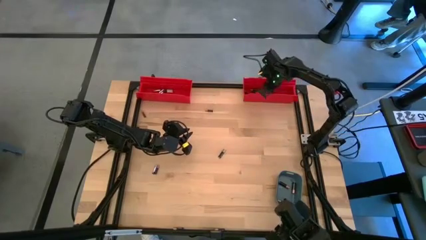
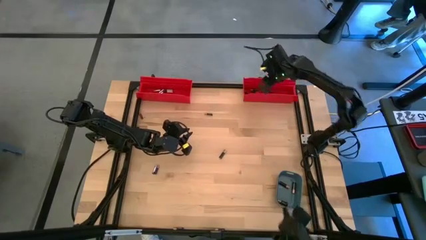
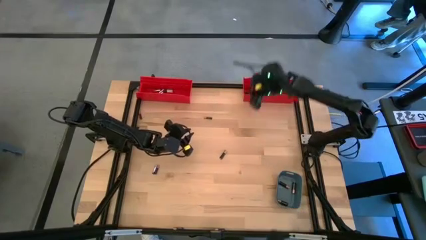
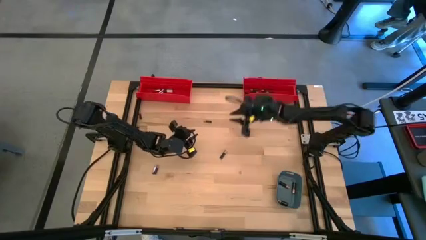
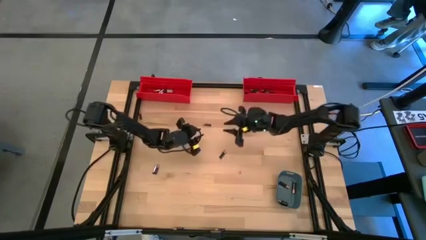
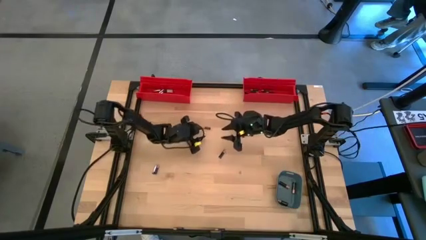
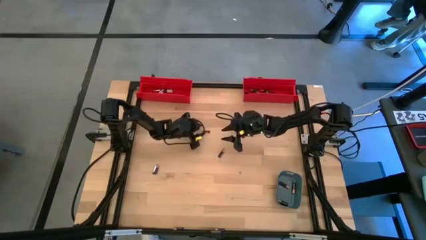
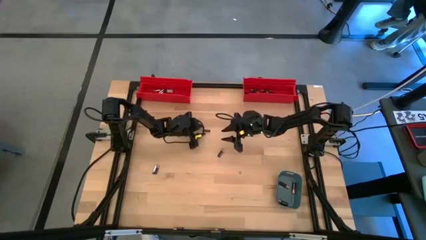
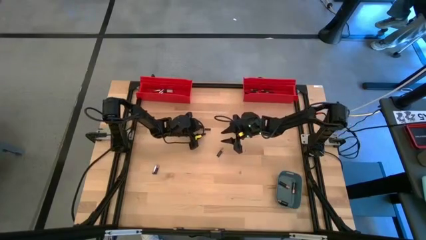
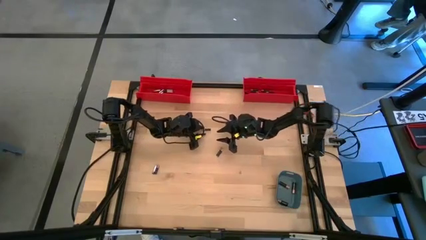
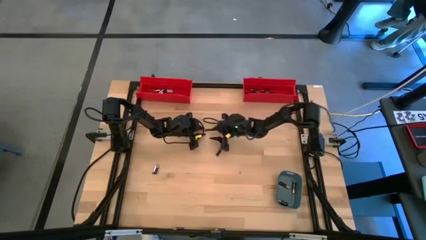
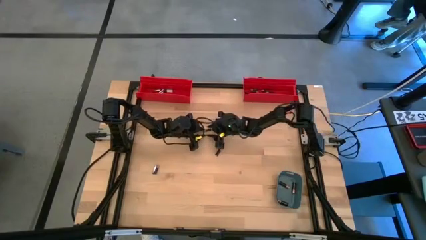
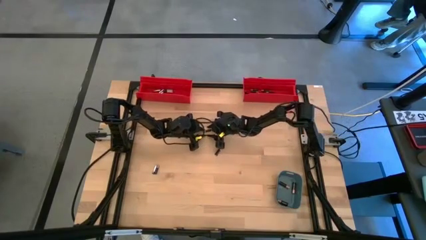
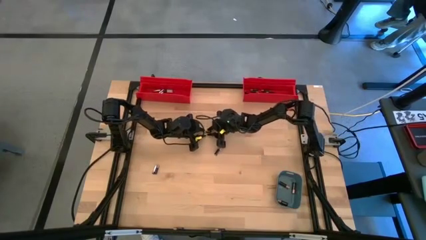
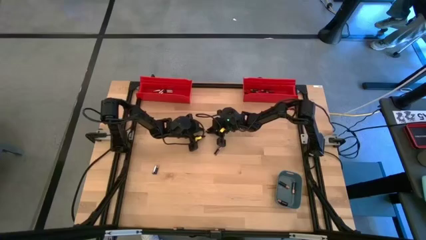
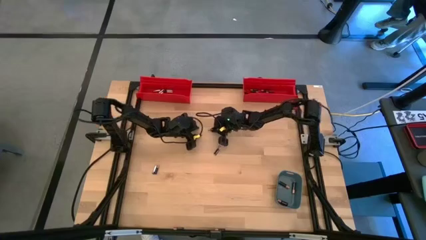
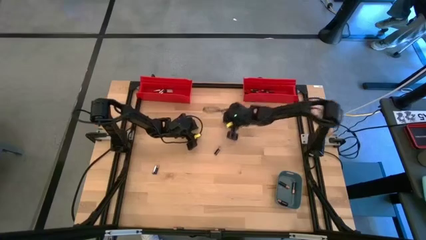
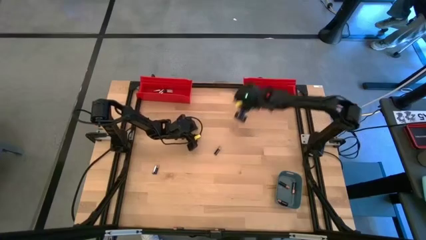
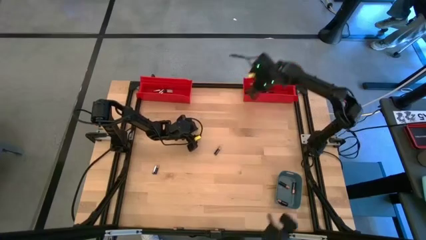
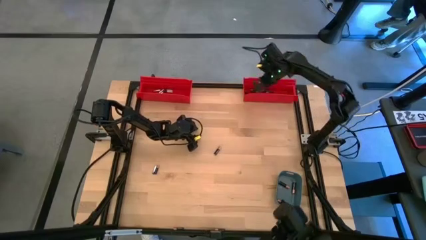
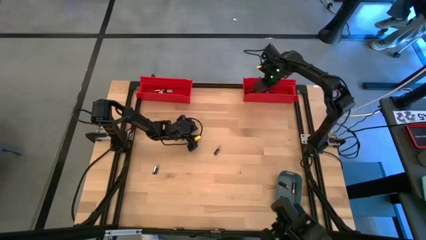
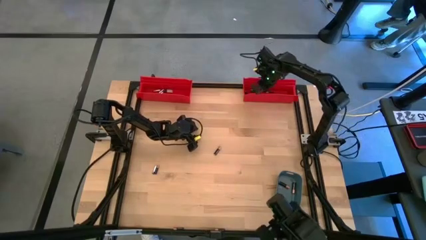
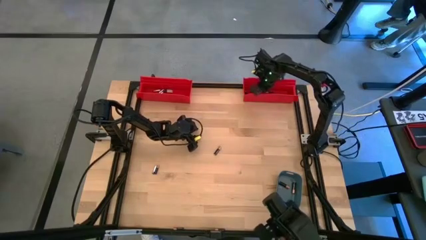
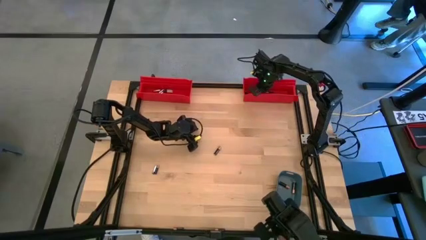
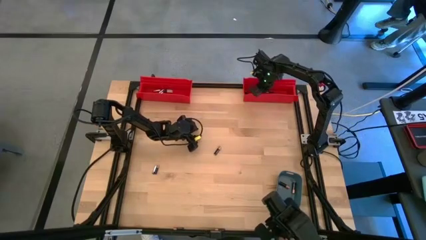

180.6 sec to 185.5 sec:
Task: Sort batteries
Put the small black battery into the right red bin

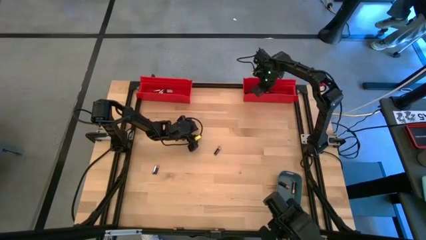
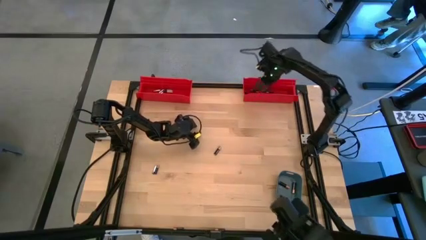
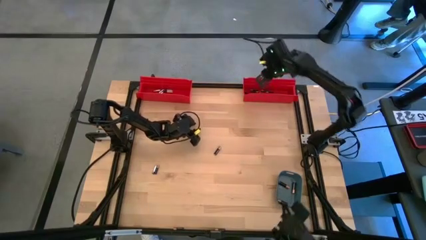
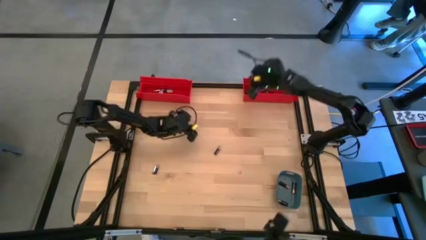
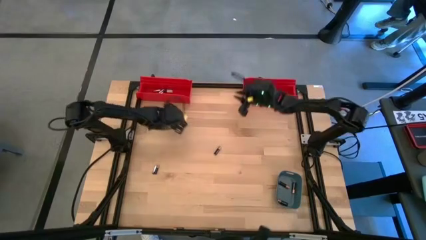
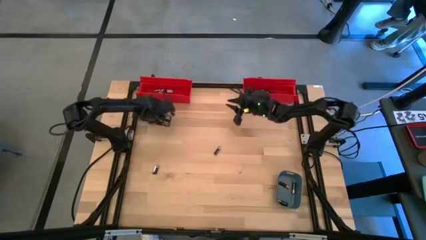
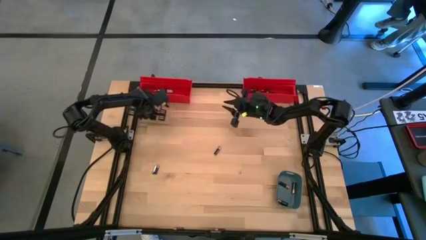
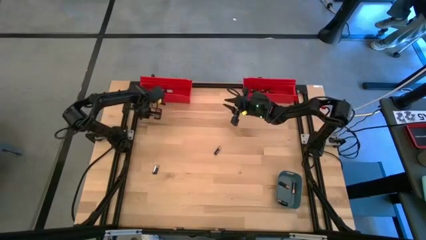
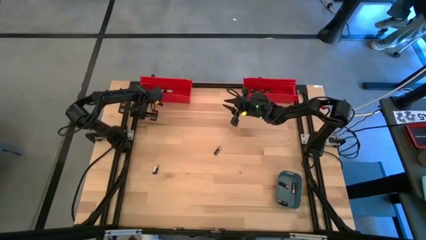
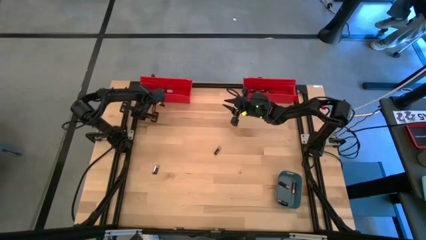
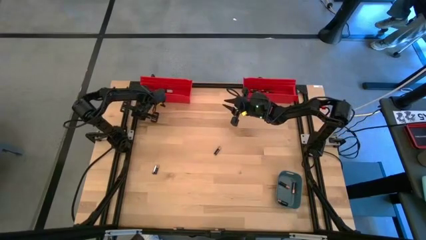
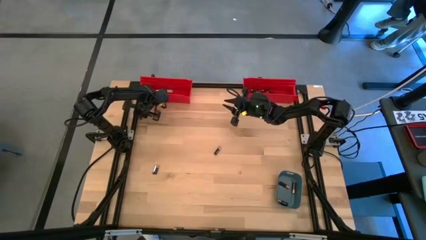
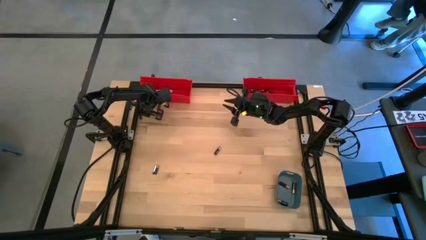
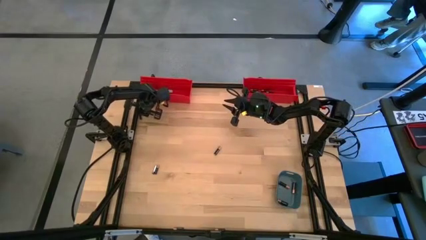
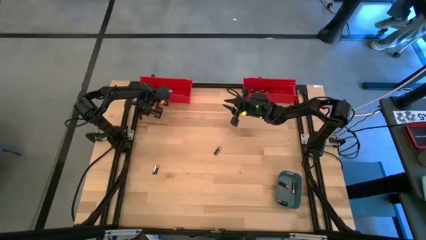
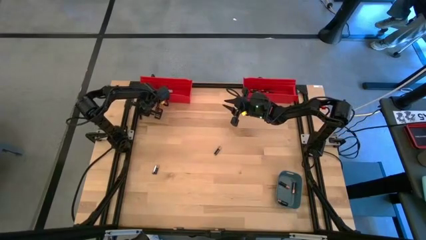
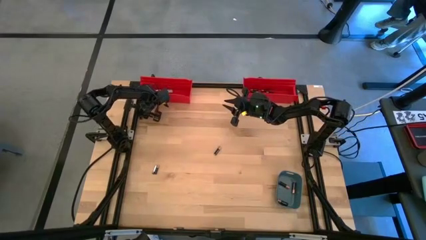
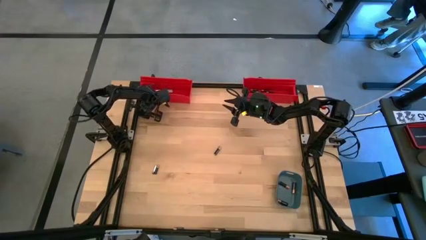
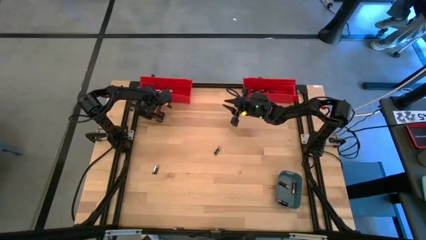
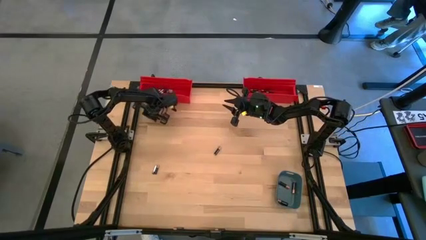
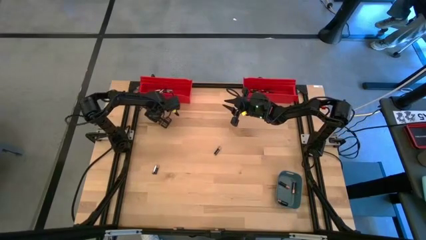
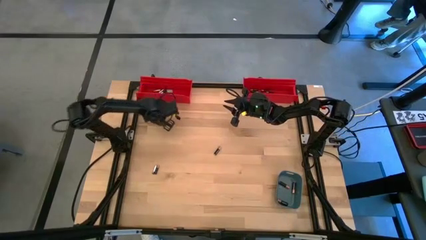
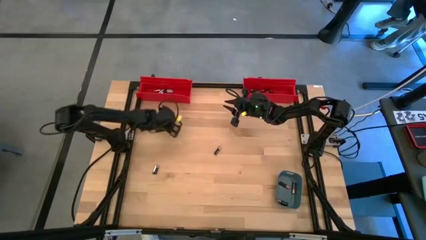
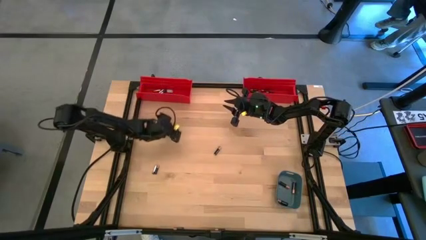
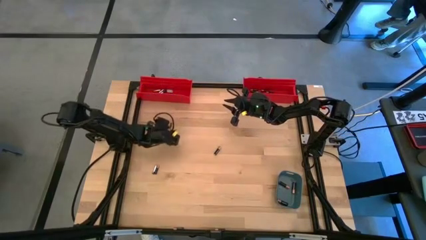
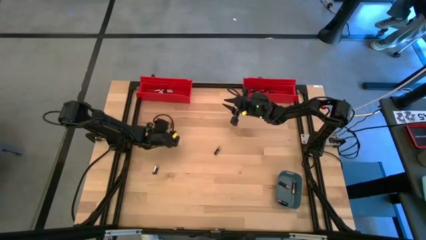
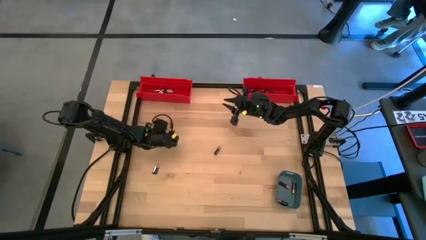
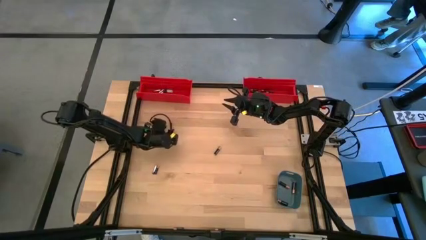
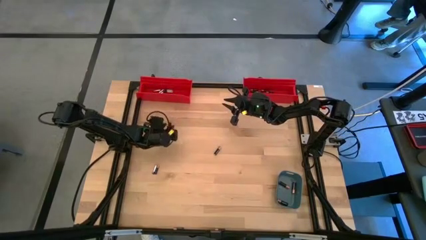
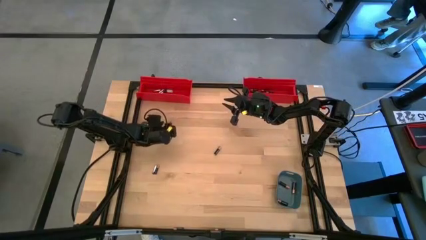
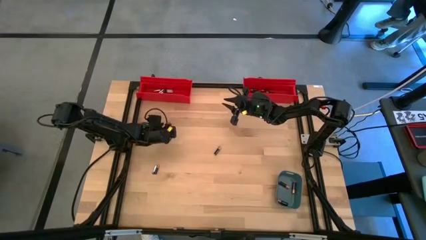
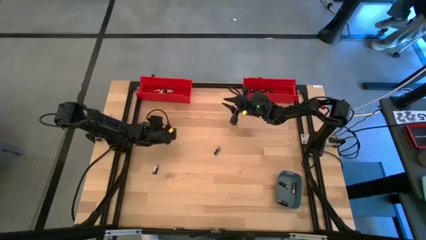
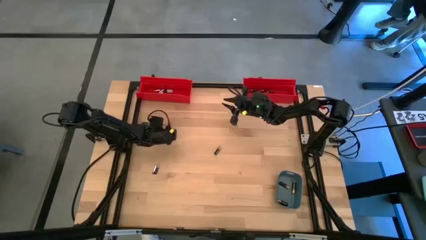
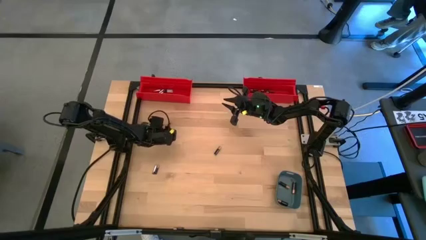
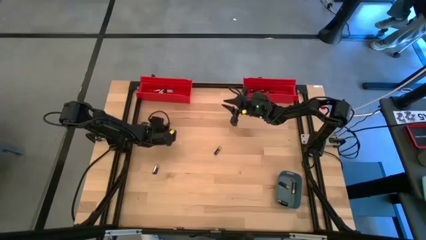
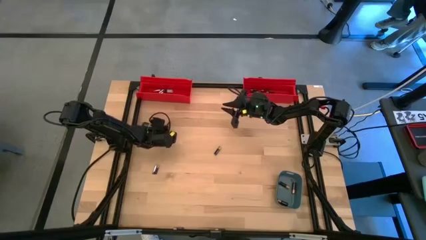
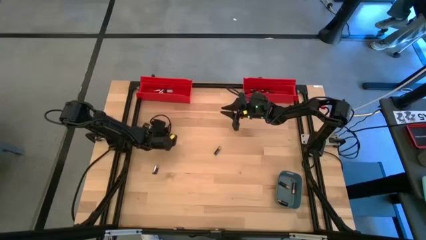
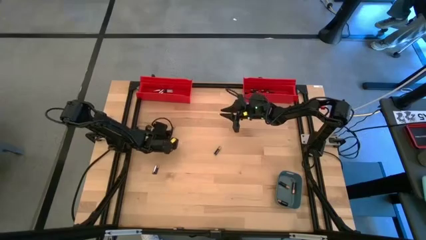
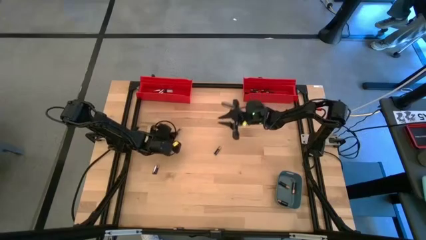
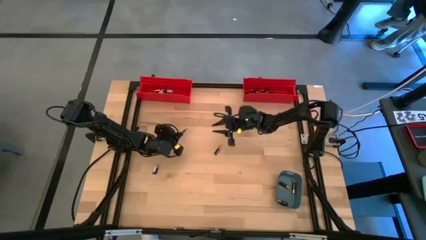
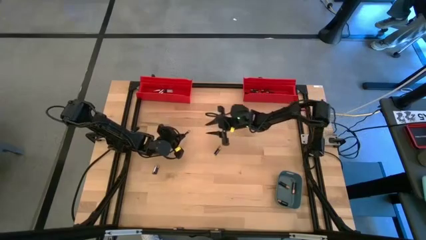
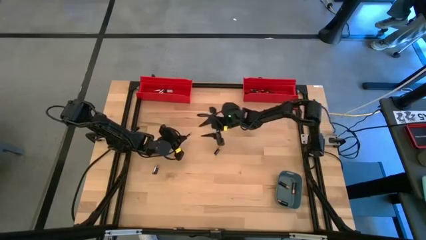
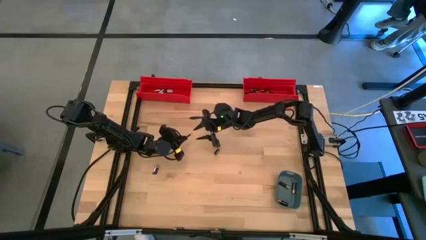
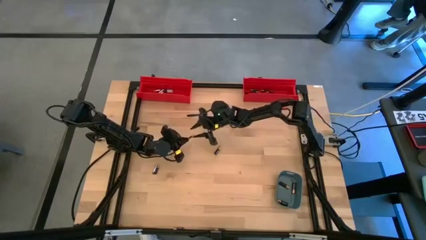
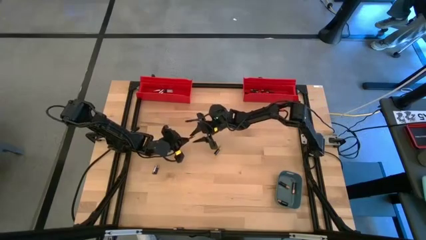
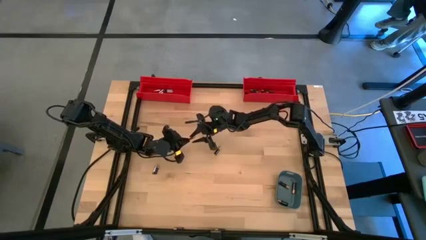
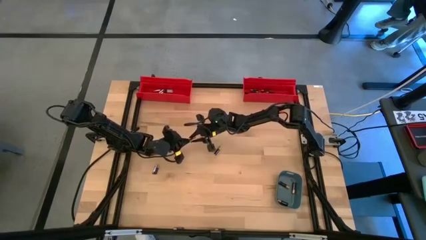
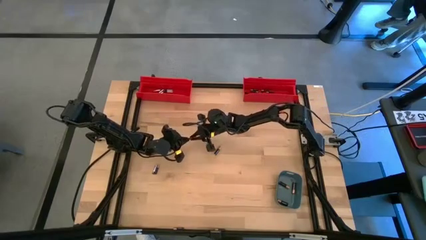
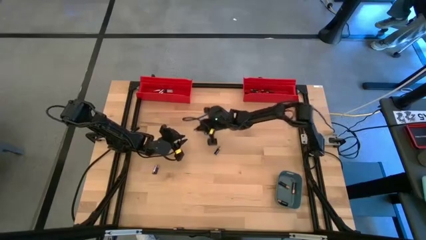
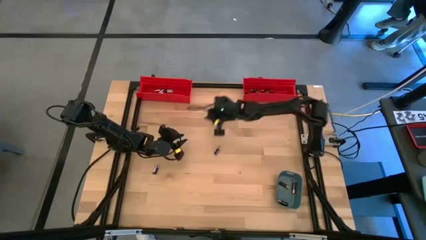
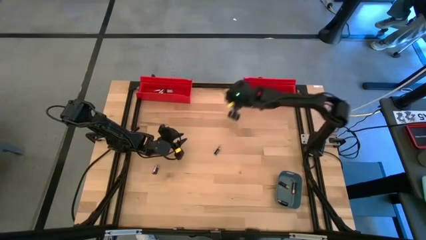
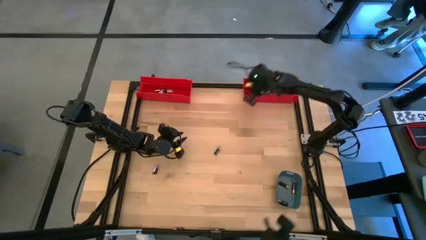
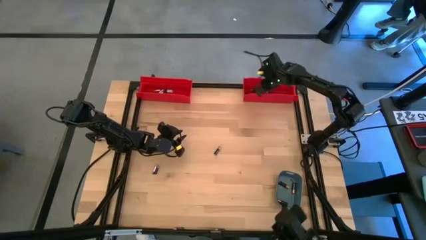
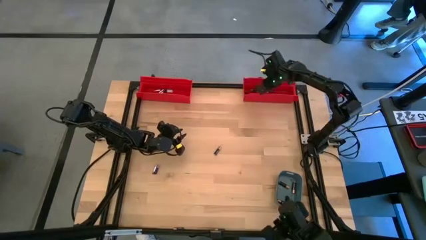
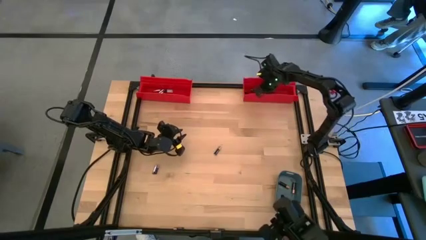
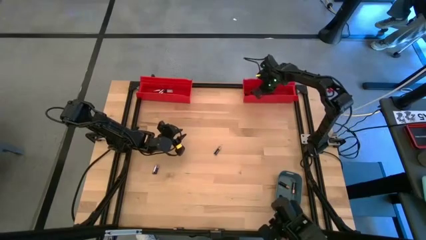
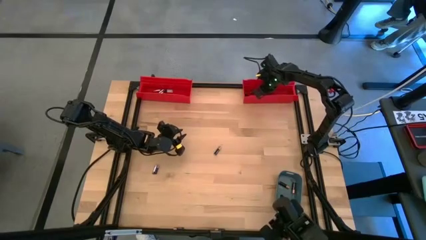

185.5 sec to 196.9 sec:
Put the small black battery into the right red bin
